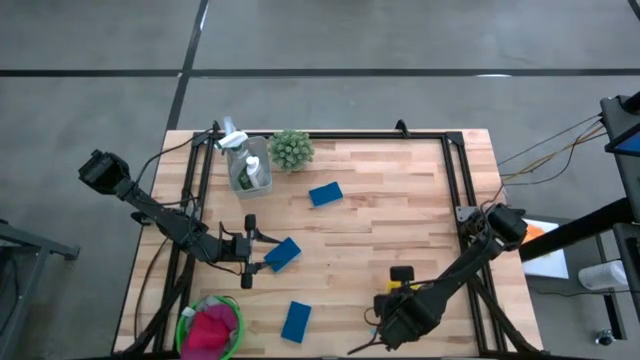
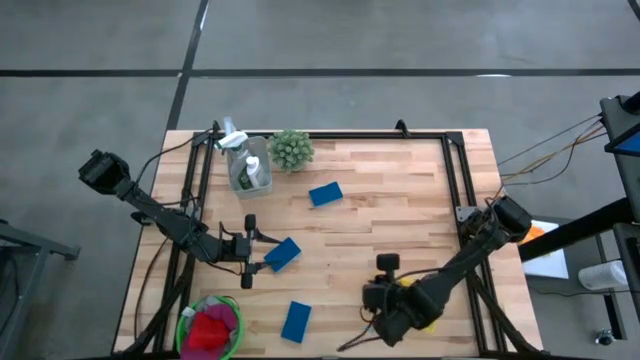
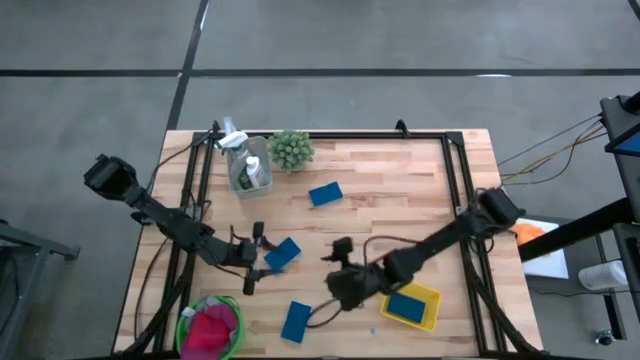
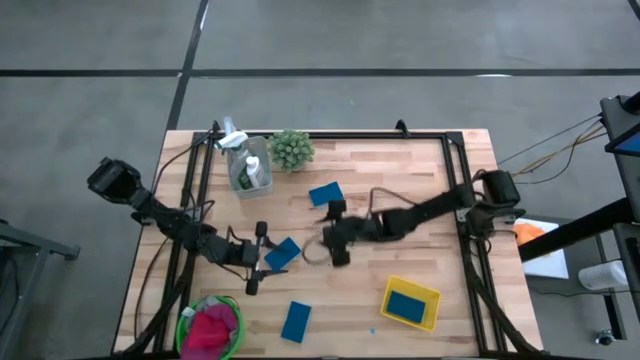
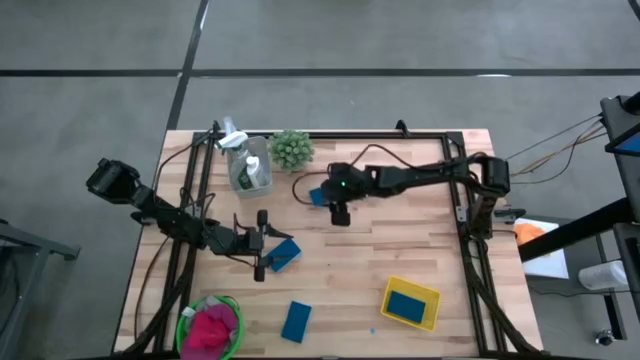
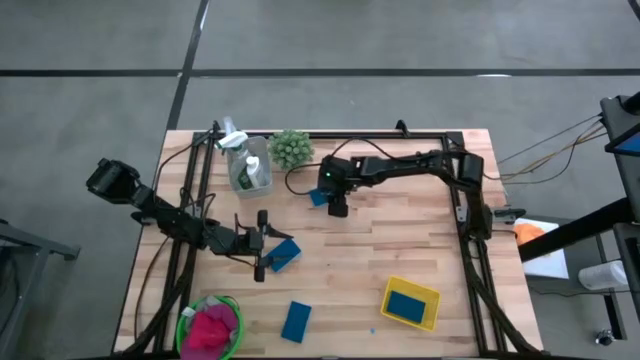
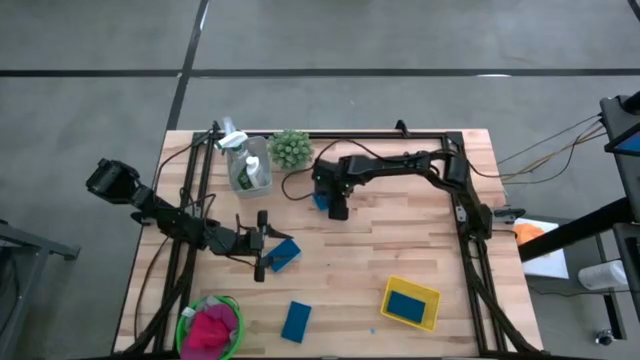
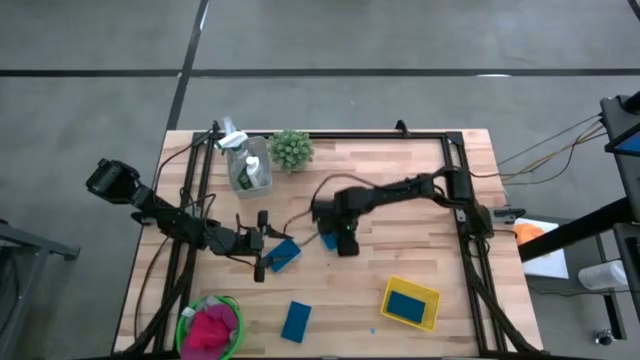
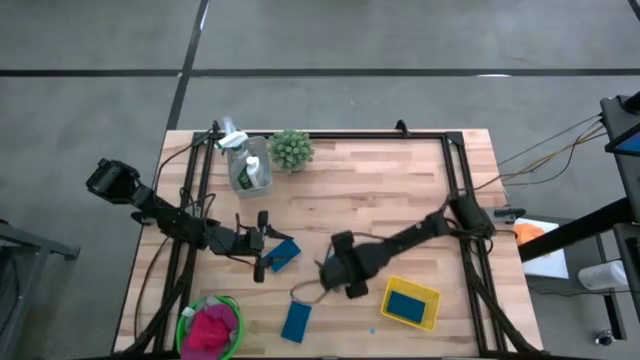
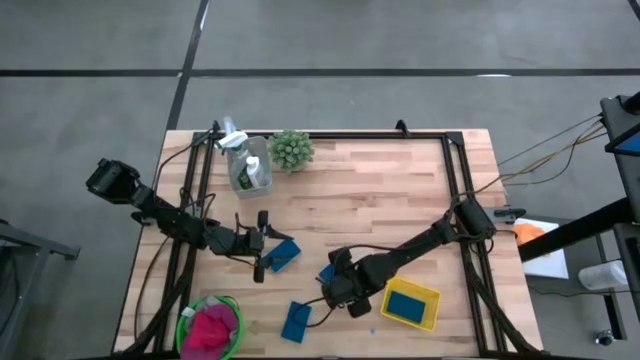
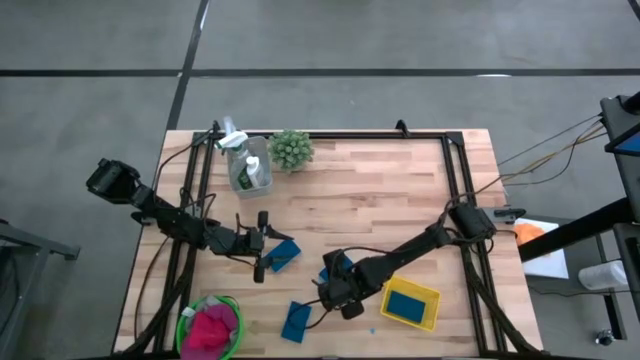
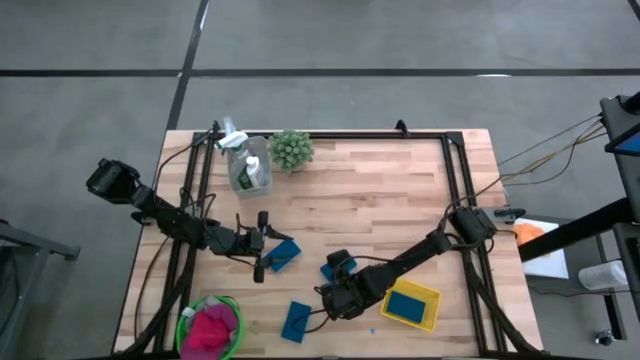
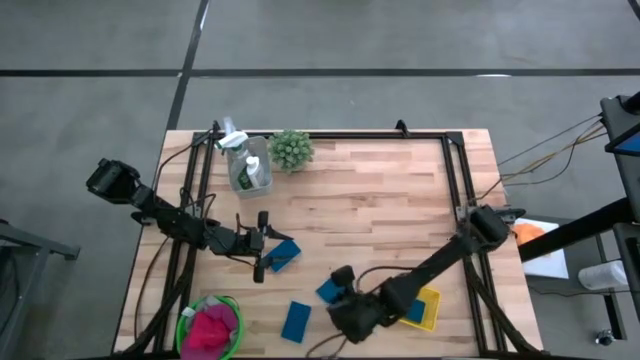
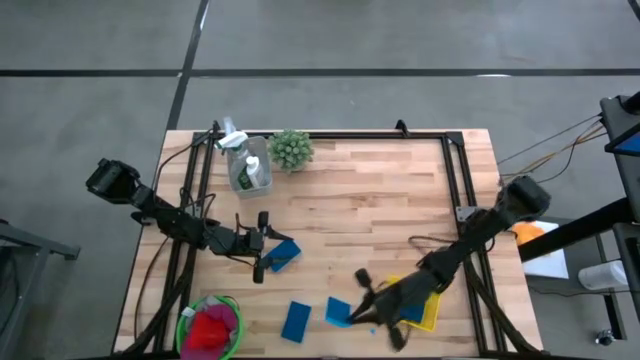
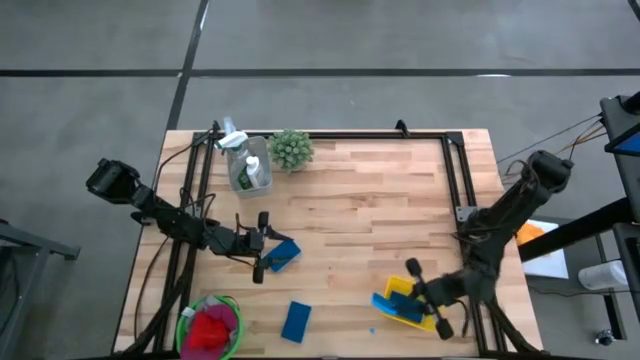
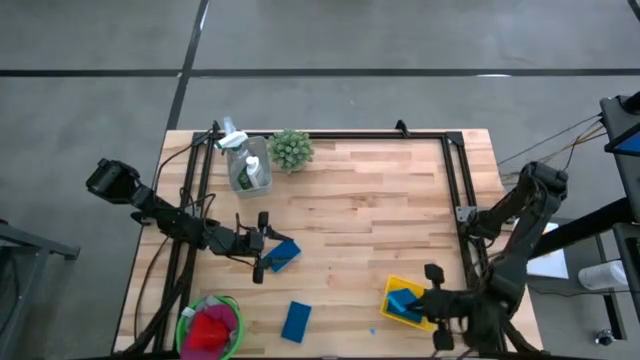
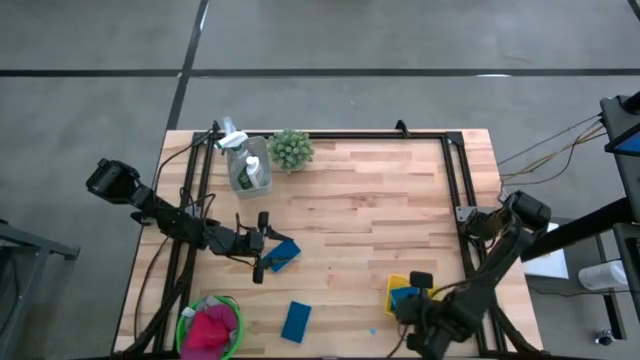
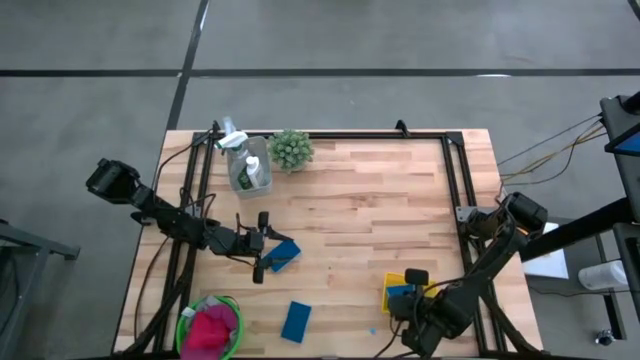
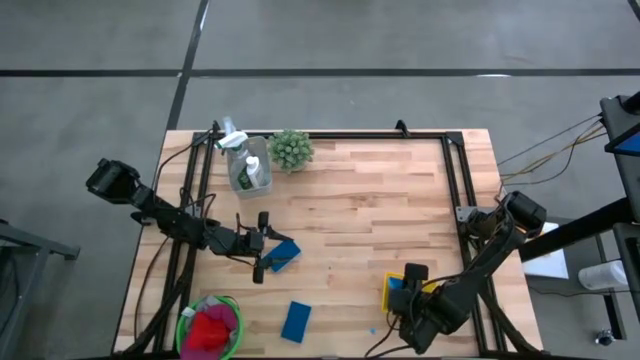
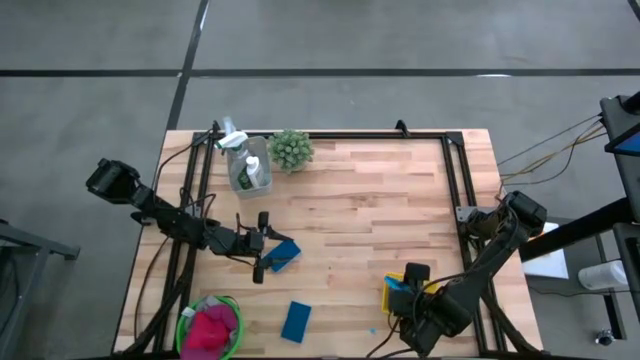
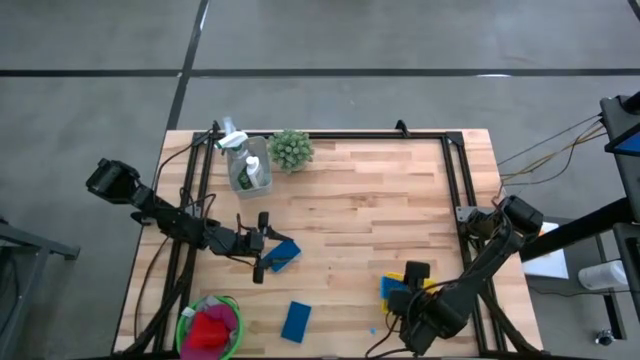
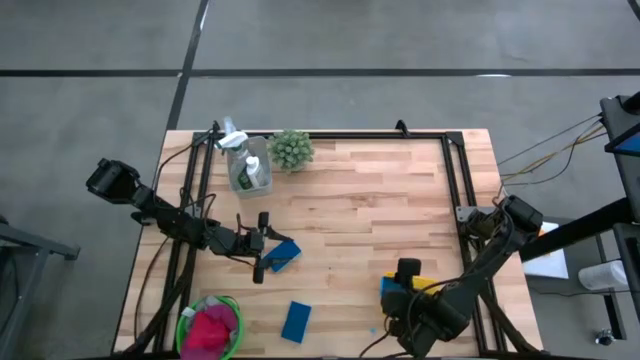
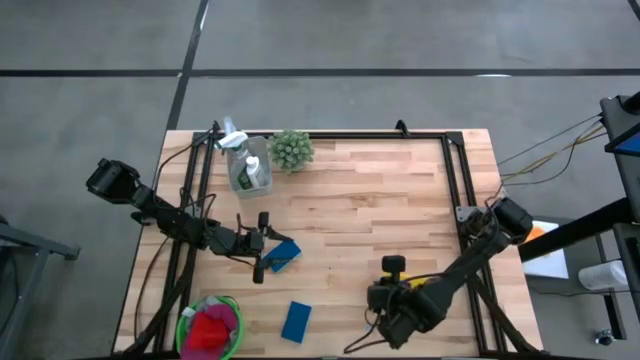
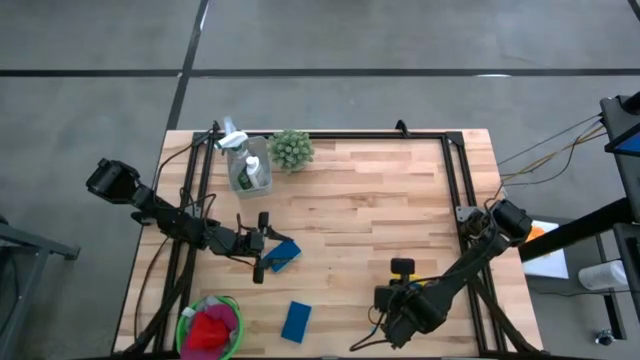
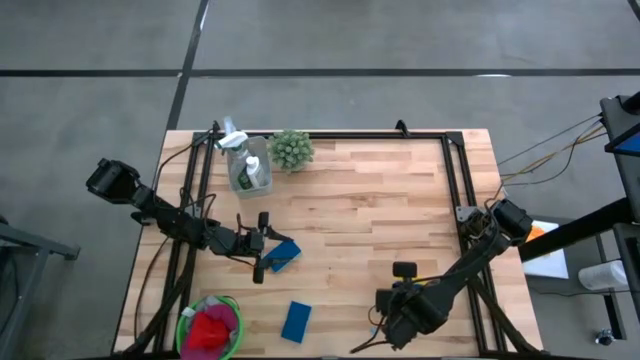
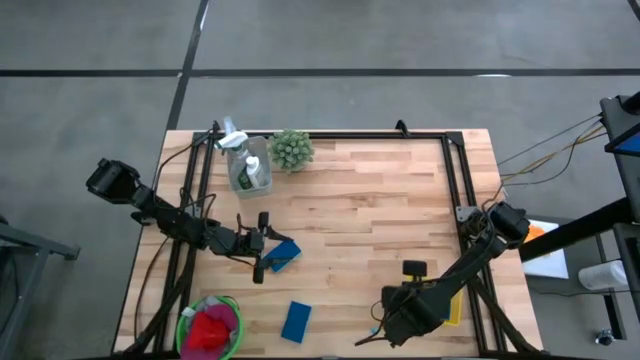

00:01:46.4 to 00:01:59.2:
Task: Pick & Place Kitchen Items
Put the blue sponge into the yellow bin

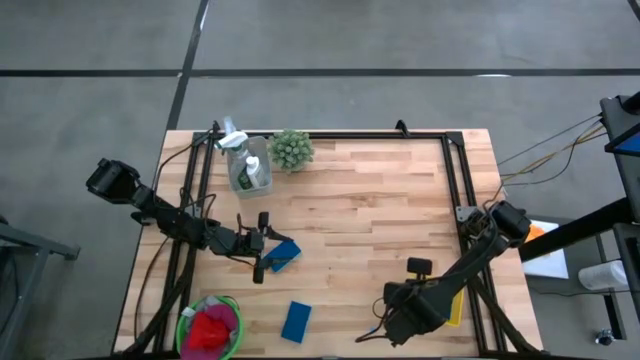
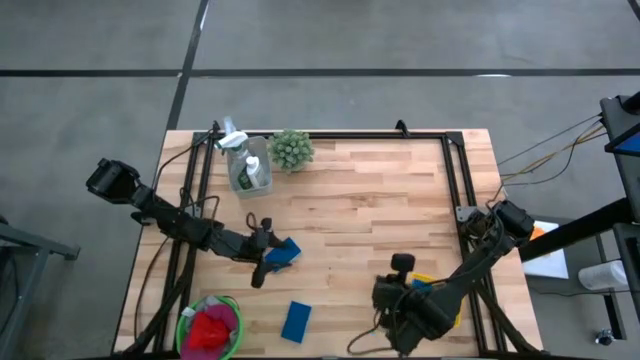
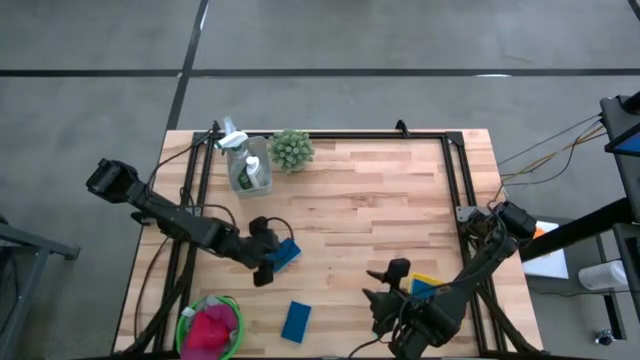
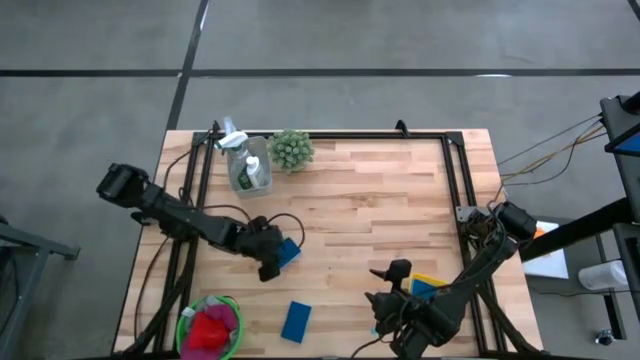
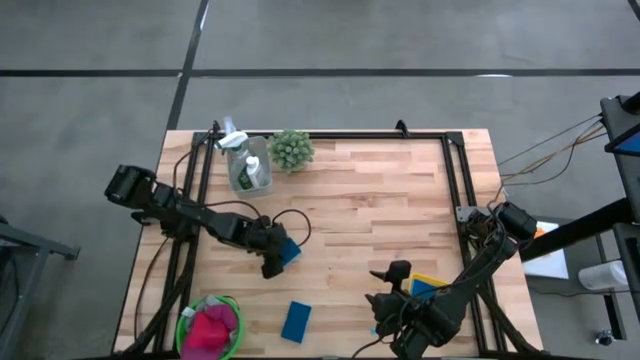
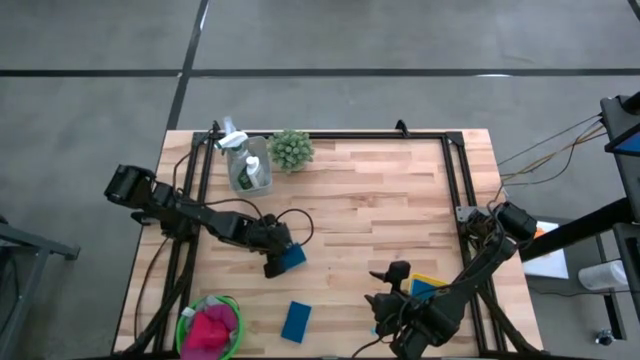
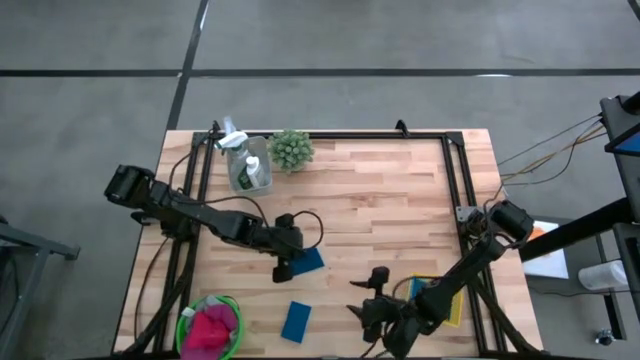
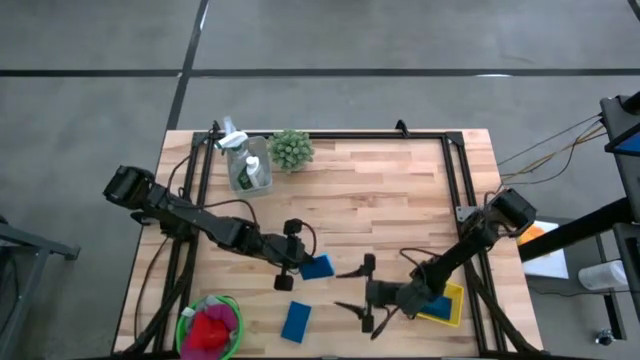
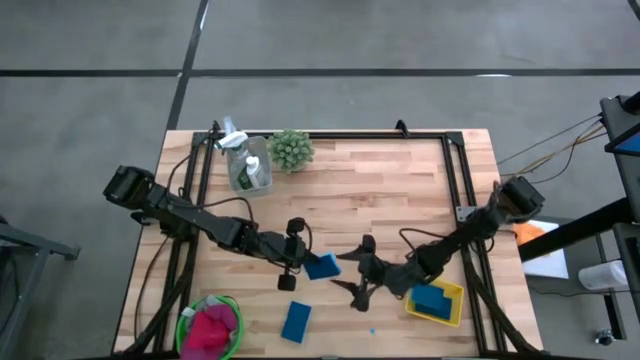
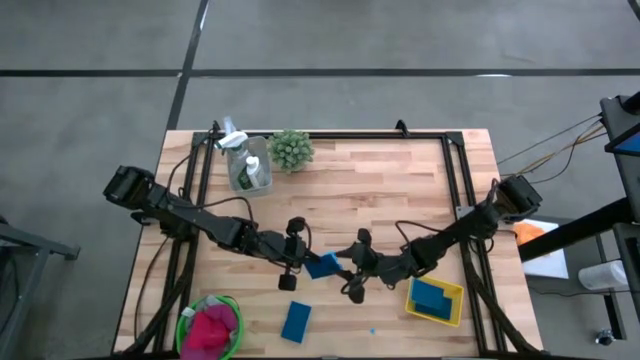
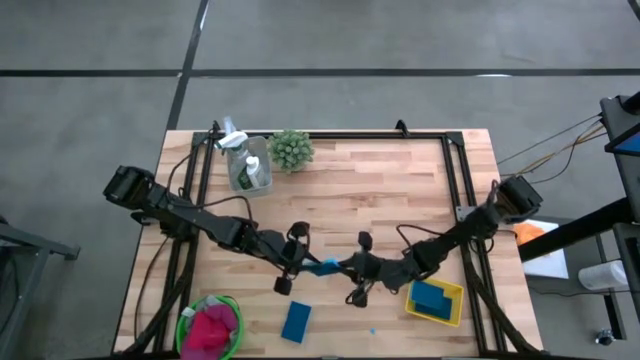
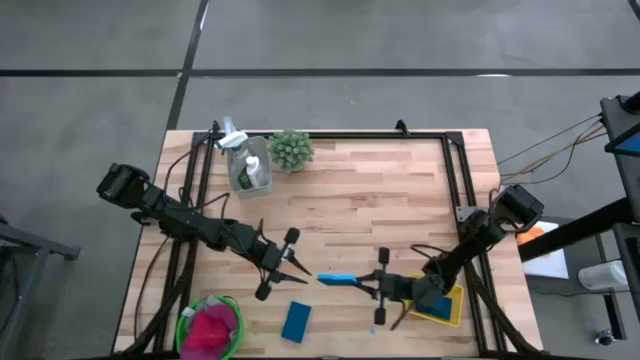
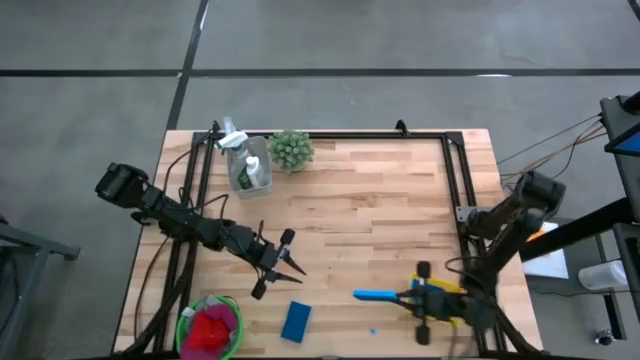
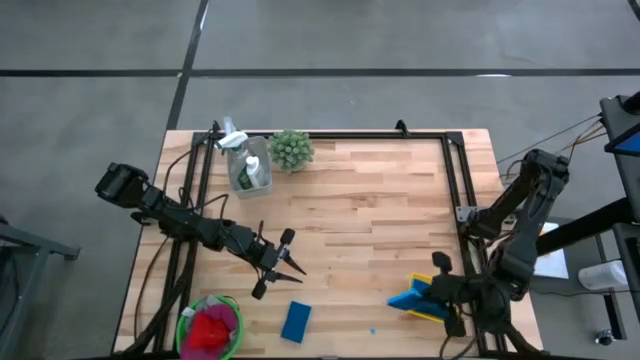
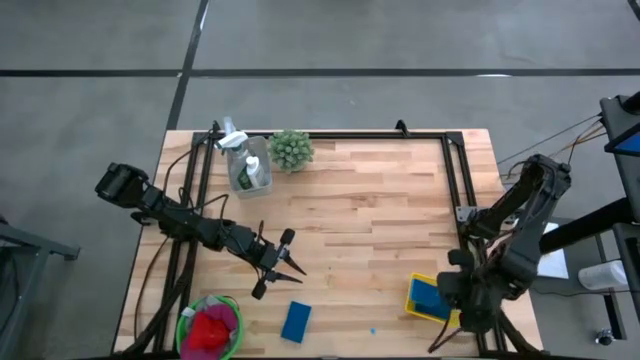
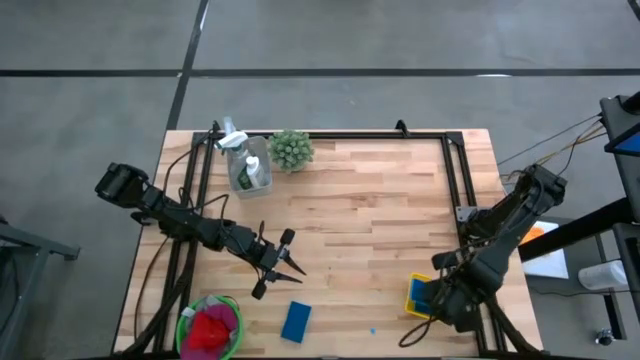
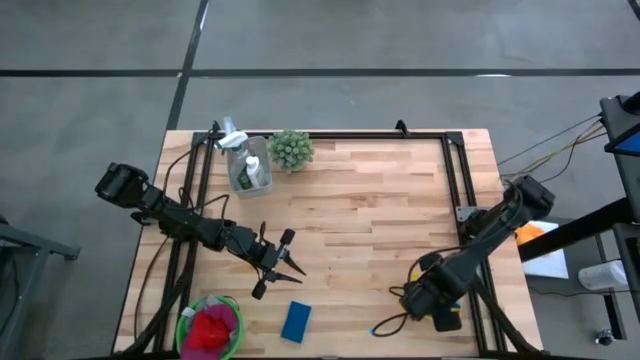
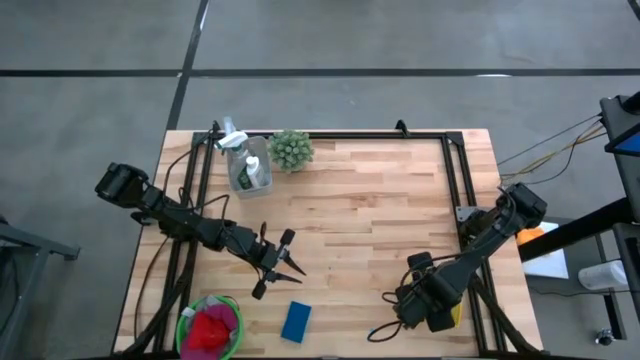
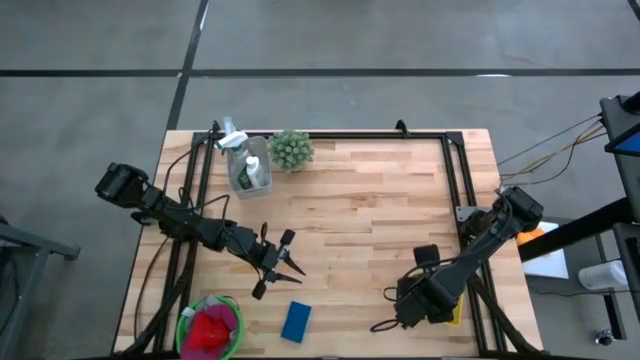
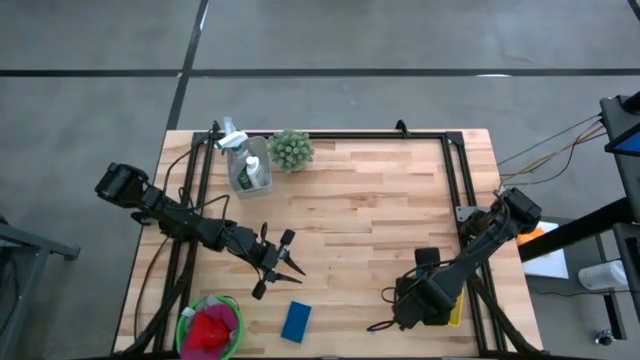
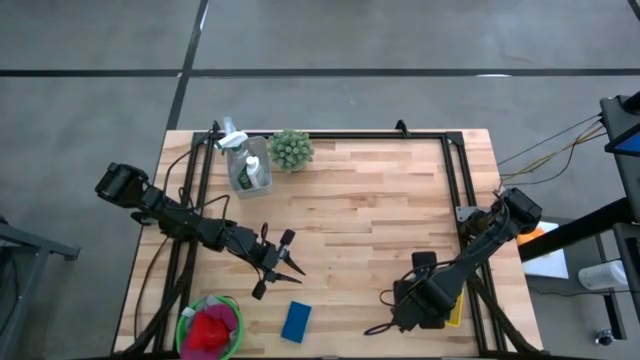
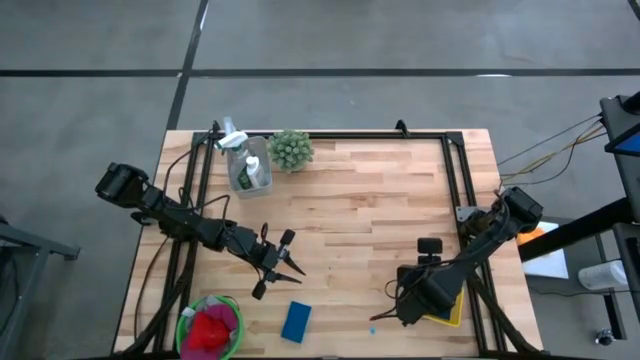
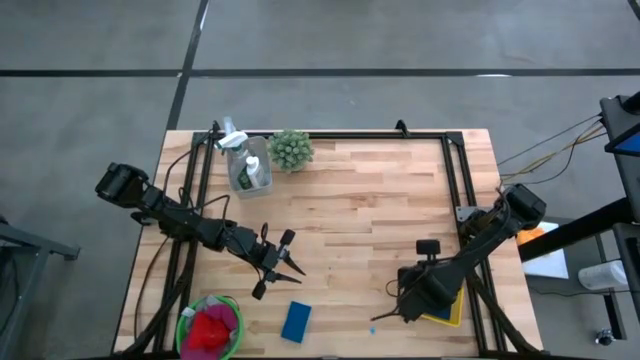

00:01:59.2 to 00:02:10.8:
Put the blue sponge into the yellow bin
